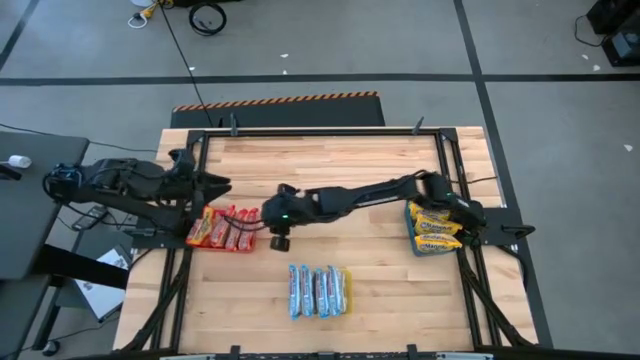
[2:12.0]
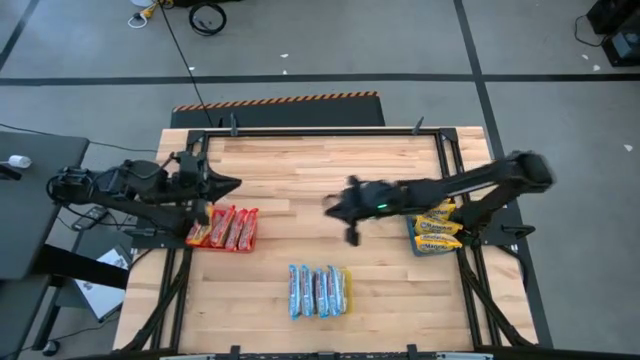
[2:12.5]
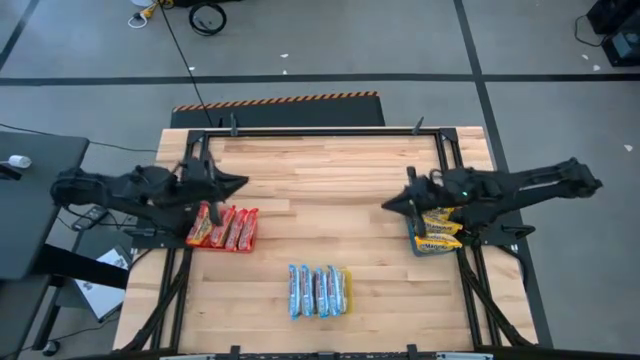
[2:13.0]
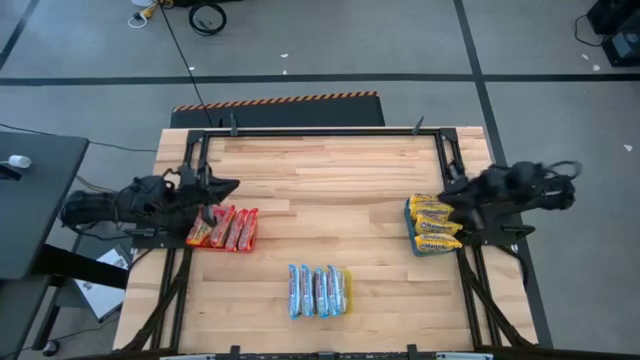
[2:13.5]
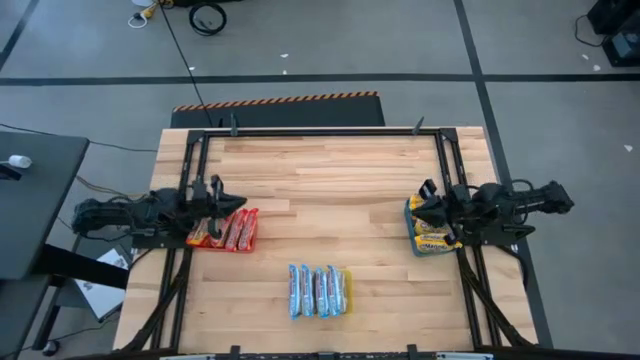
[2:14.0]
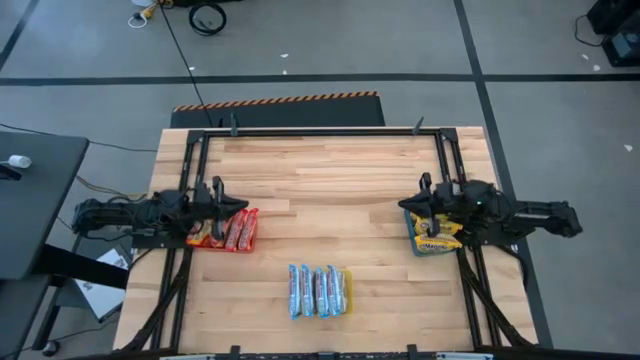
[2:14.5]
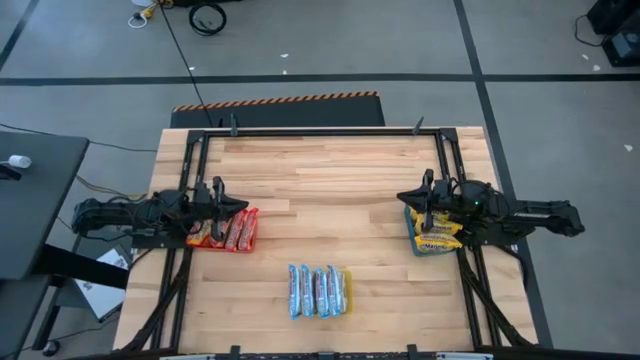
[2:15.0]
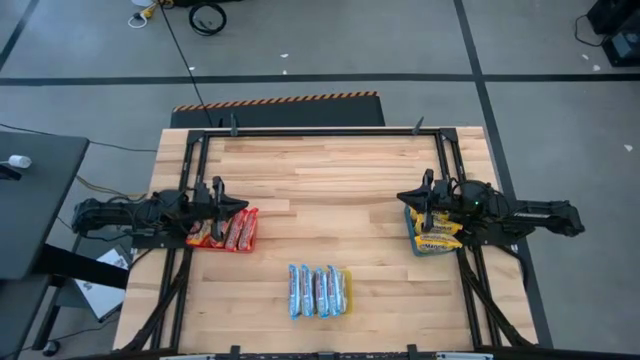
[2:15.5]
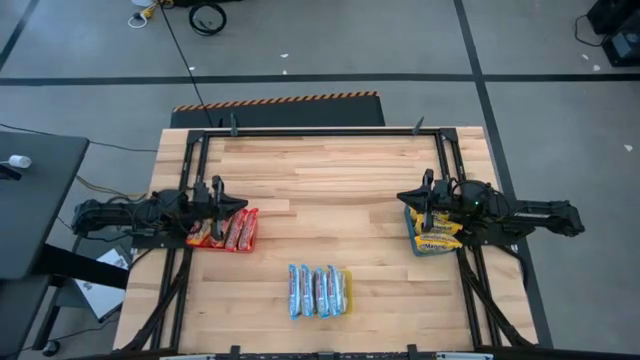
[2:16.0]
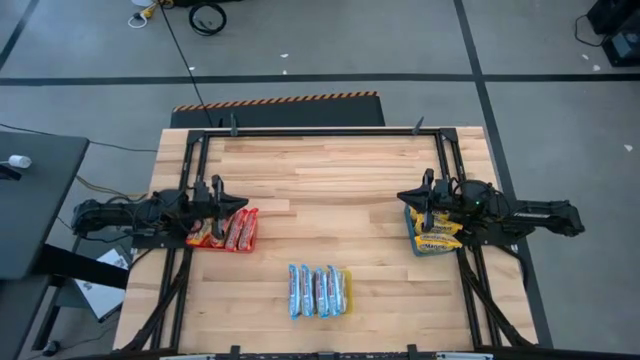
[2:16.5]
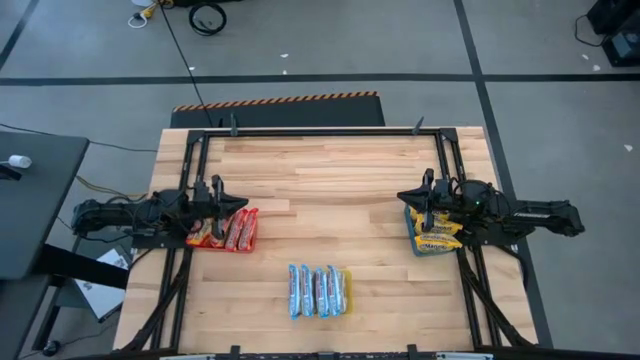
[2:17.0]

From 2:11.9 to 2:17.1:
Task: Sort Maruchan noodles
Return to Home Position

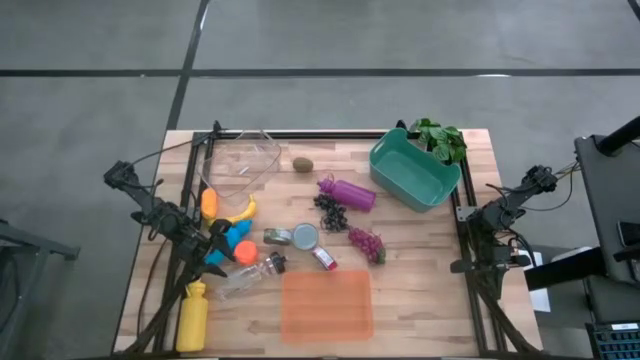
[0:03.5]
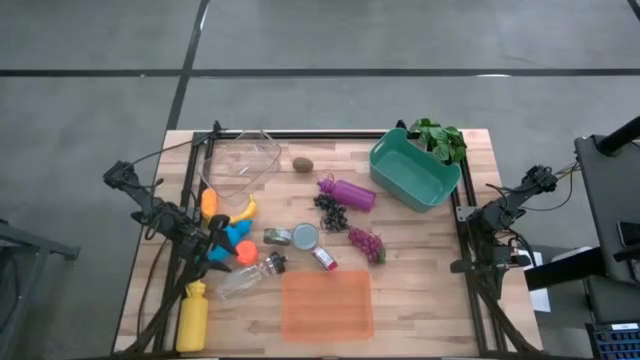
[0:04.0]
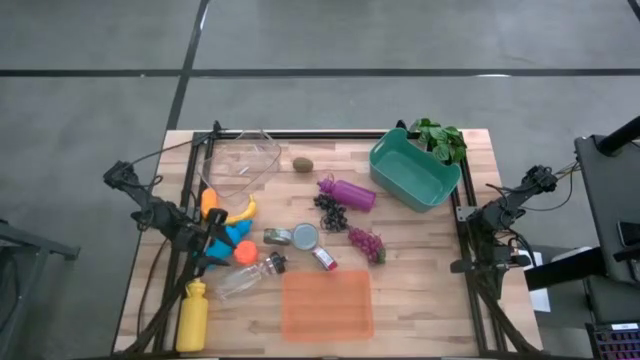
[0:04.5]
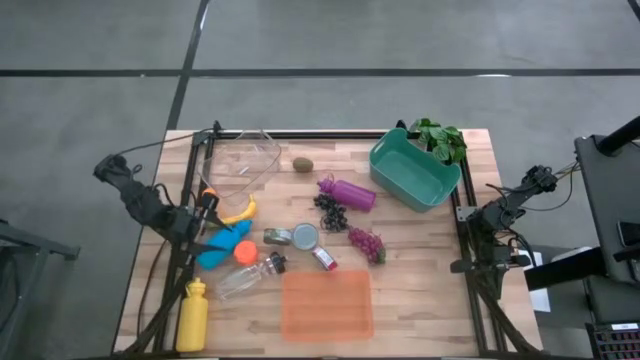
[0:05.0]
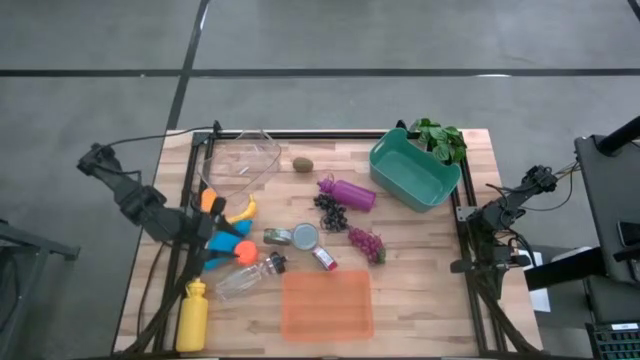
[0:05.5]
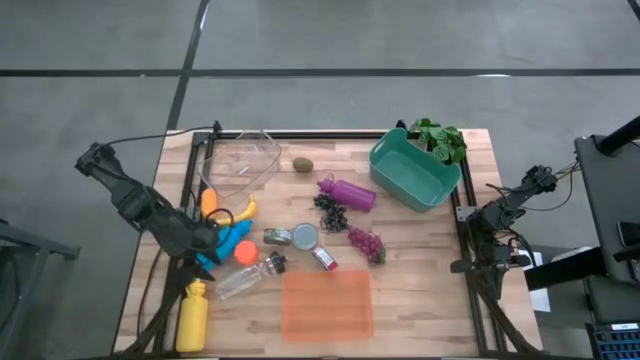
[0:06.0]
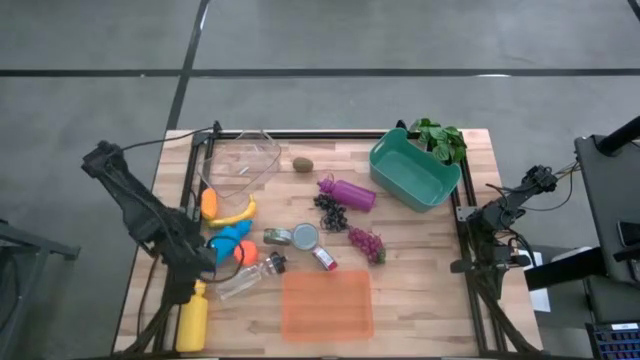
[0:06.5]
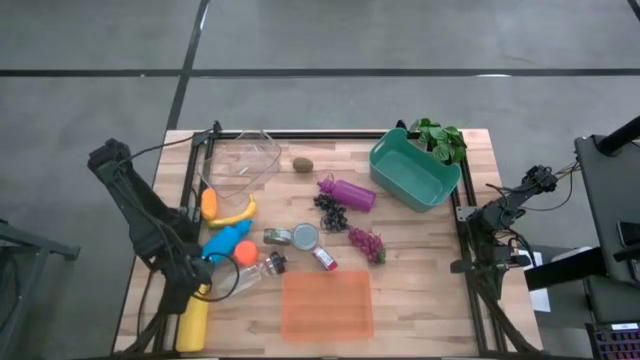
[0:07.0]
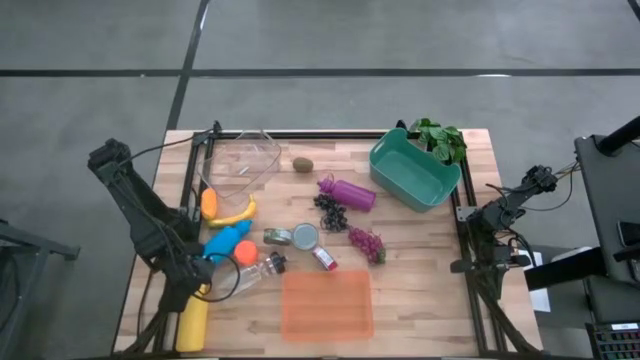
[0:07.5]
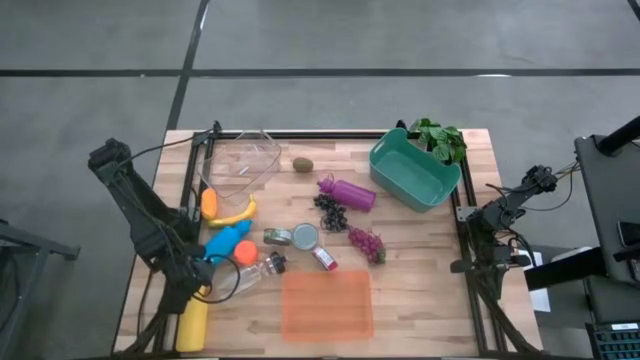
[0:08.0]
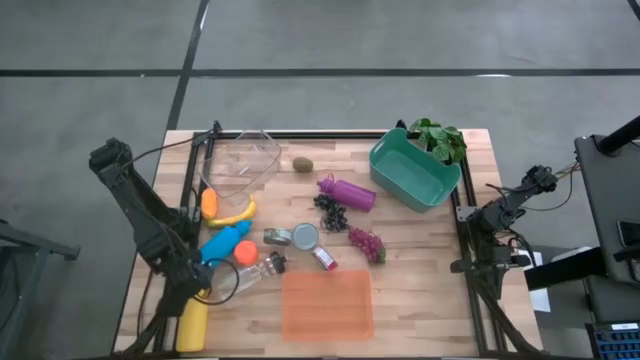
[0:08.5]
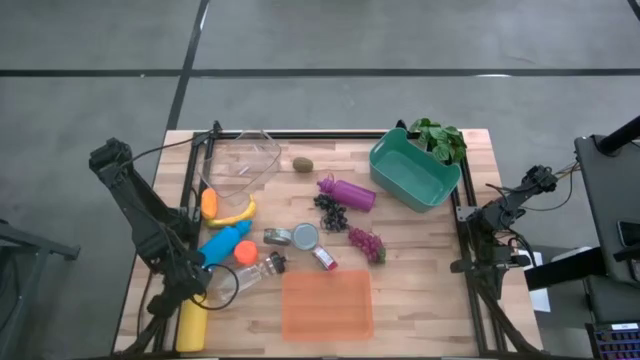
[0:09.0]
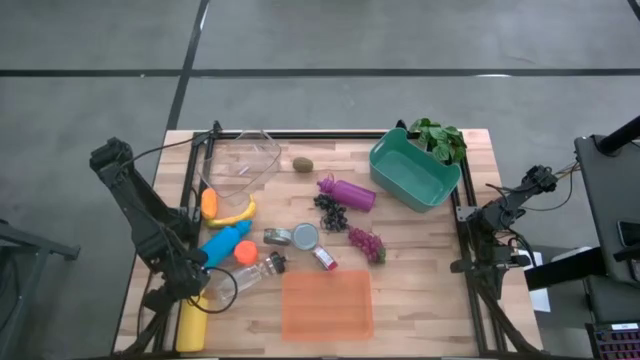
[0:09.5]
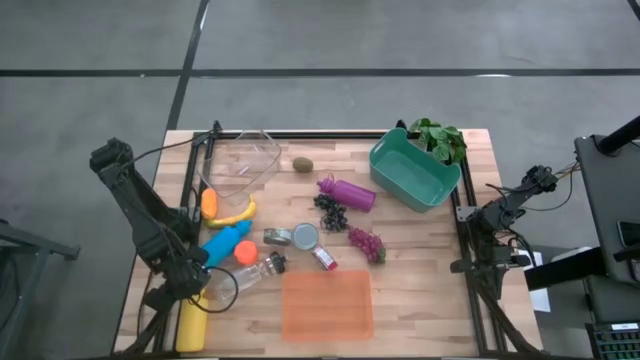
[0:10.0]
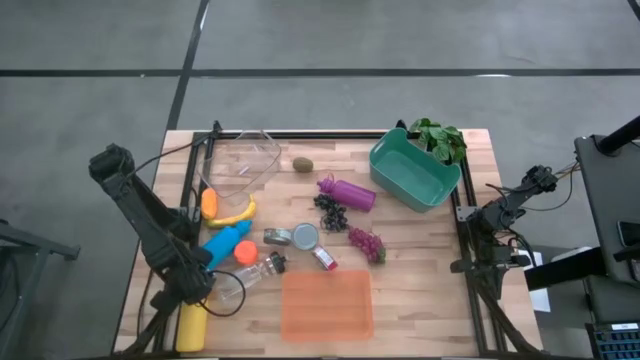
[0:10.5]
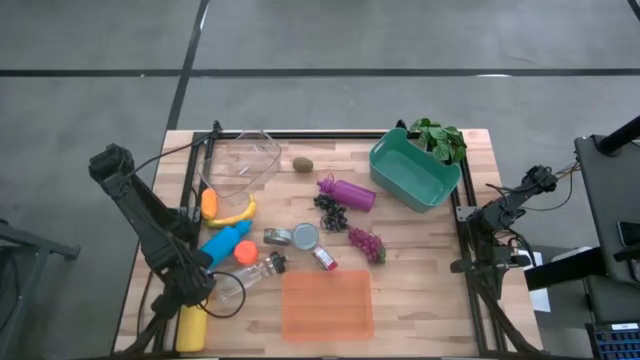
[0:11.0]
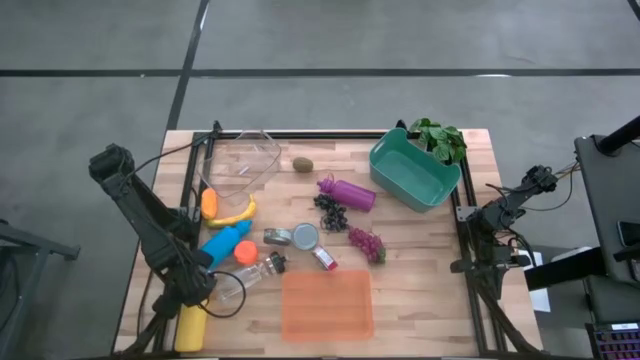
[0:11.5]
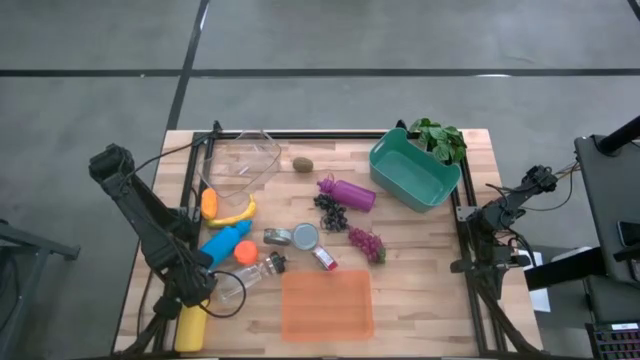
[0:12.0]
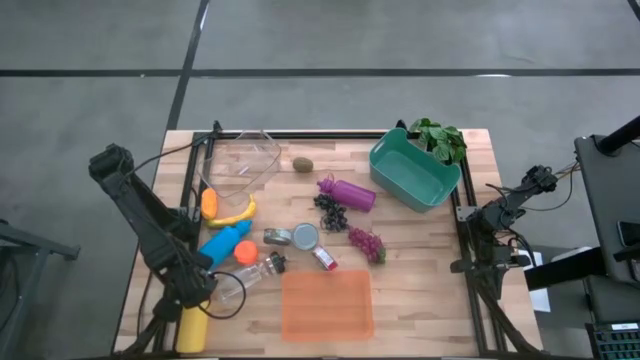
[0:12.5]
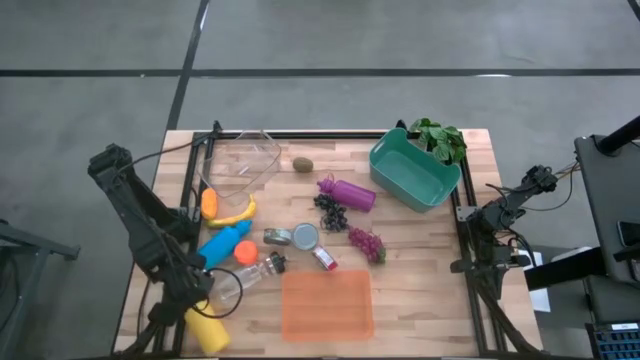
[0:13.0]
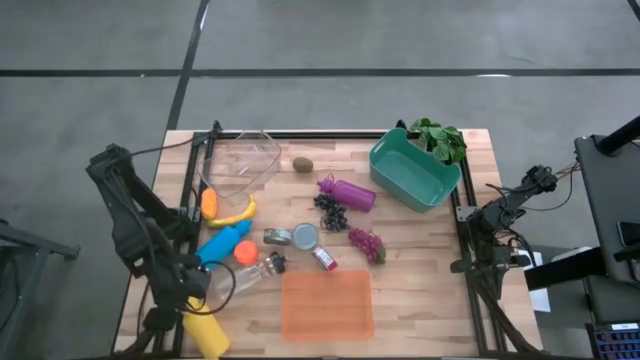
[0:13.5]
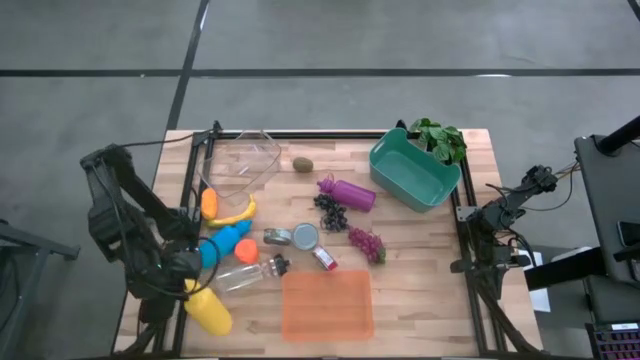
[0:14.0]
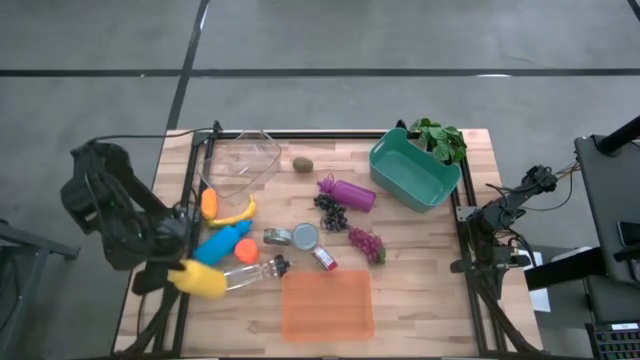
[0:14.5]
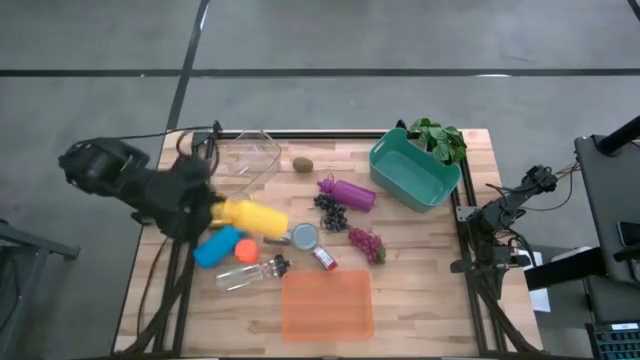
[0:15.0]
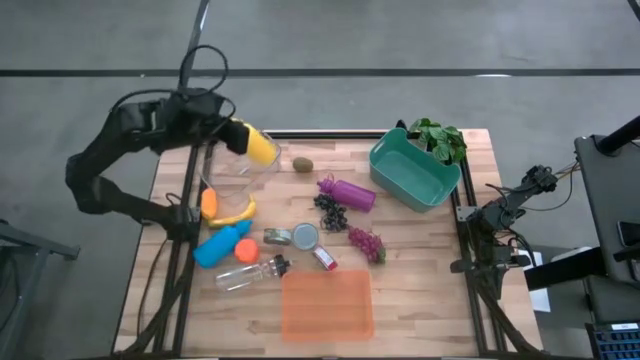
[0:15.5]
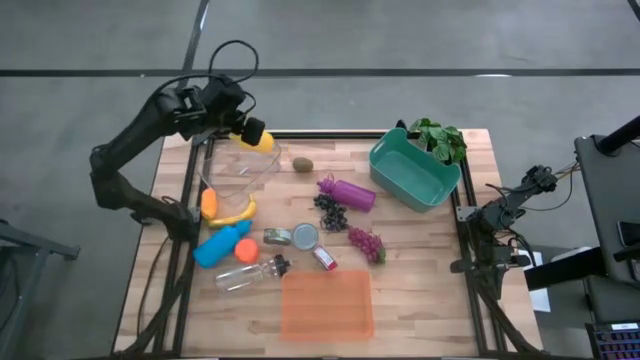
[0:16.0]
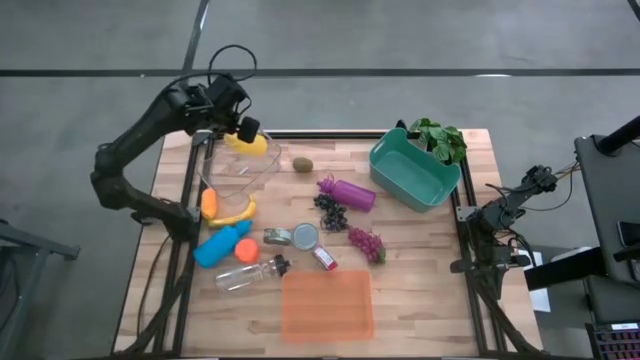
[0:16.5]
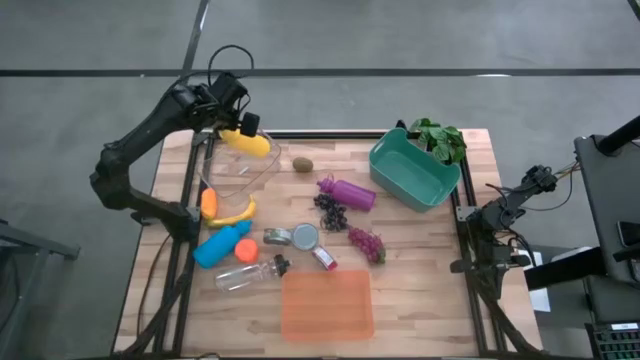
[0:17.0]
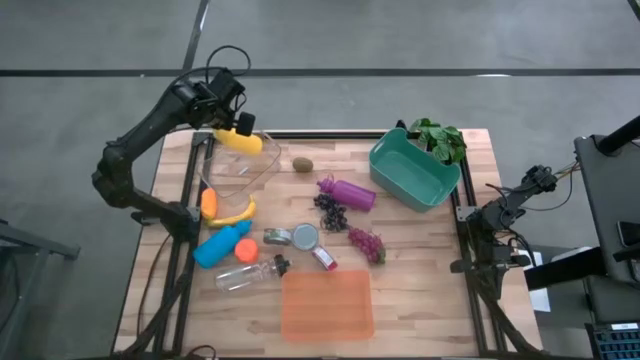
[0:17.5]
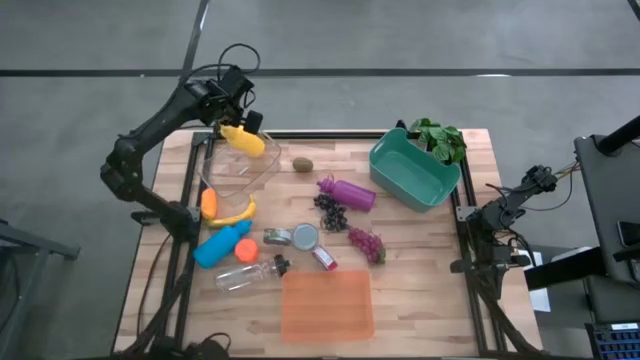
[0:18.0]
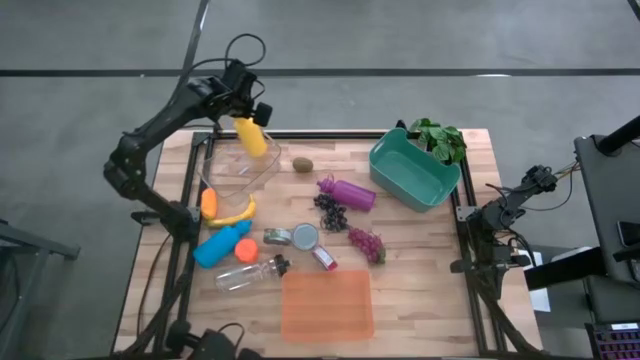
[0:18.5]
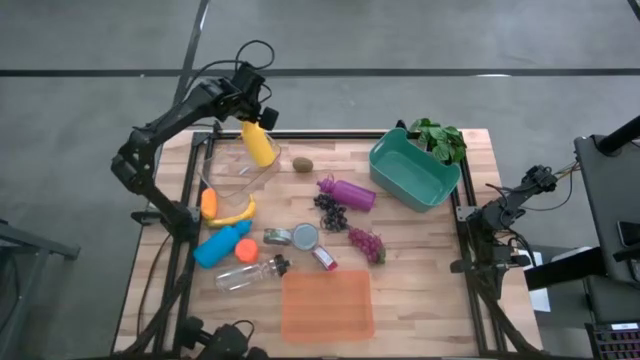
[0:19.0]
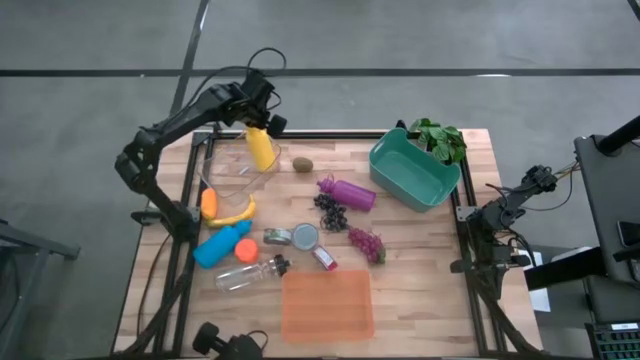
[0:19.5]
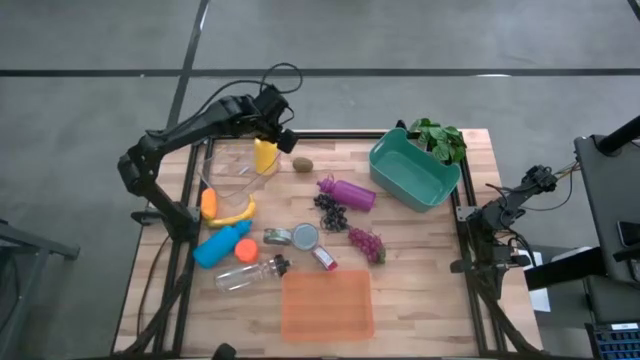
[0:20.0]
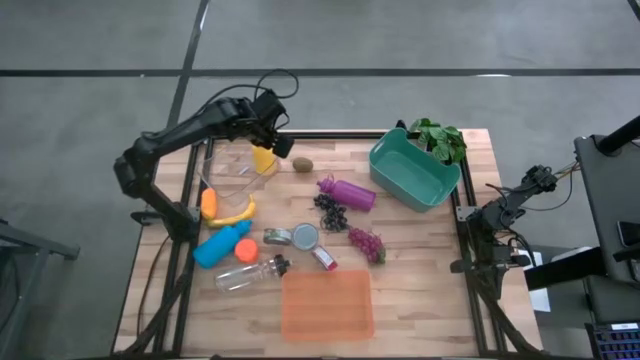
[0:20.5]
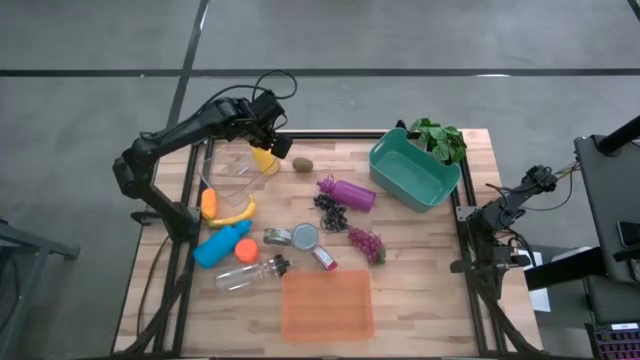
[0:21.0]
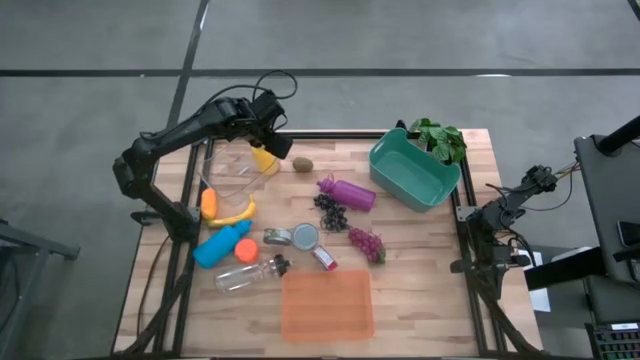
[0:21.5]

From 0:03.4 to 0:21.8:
Task: Pick & Place Food Item
Put the yellow water bottle into the transparent bin
